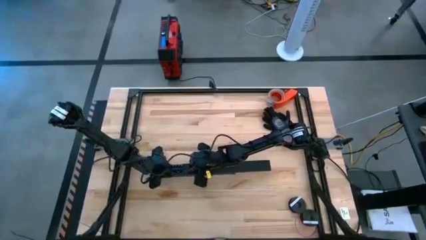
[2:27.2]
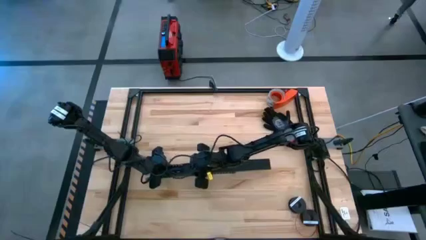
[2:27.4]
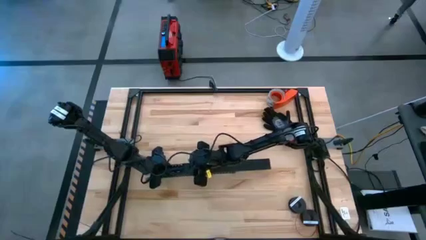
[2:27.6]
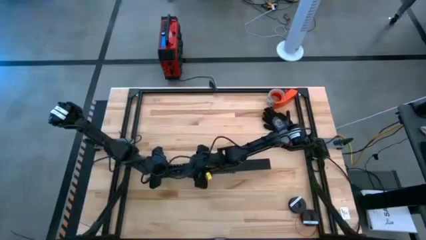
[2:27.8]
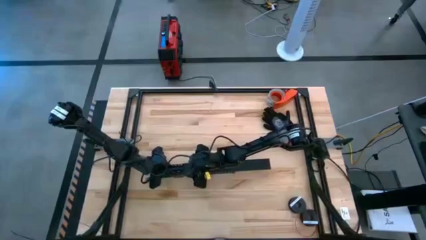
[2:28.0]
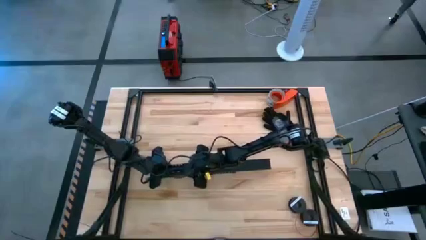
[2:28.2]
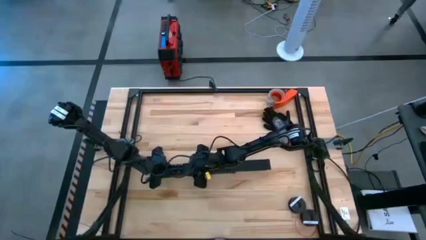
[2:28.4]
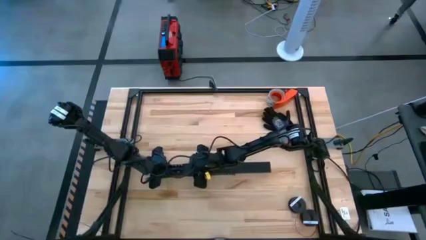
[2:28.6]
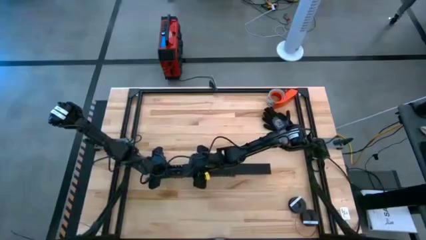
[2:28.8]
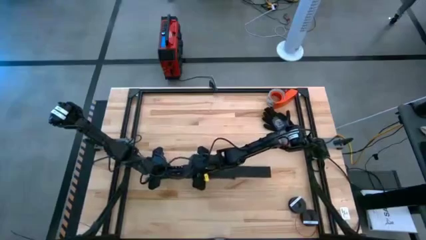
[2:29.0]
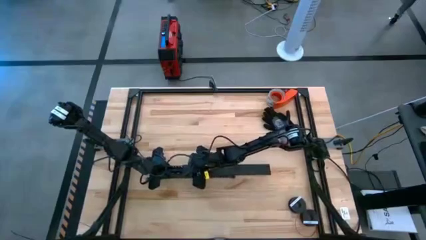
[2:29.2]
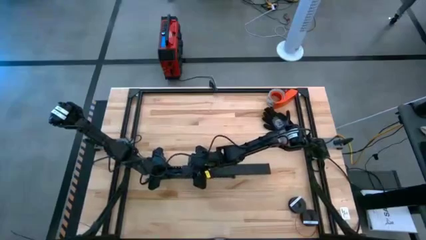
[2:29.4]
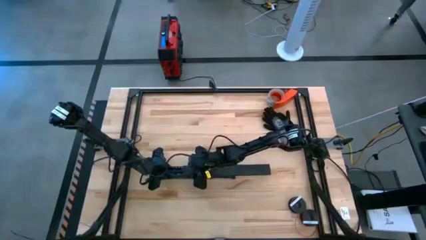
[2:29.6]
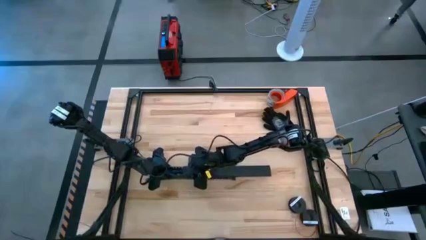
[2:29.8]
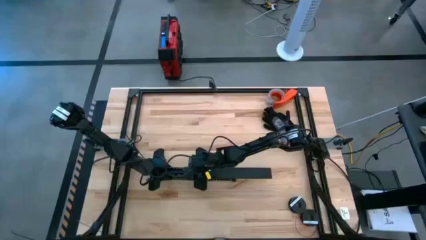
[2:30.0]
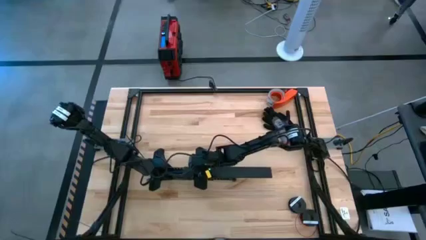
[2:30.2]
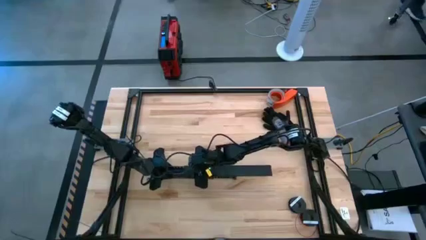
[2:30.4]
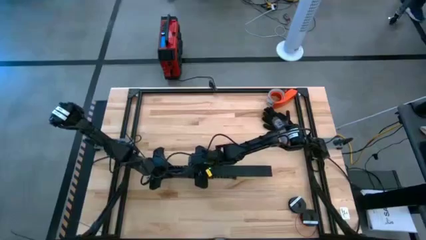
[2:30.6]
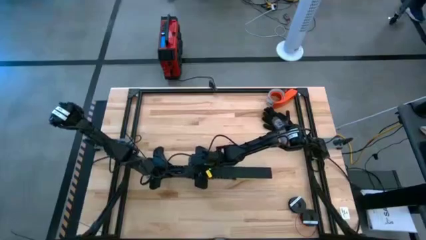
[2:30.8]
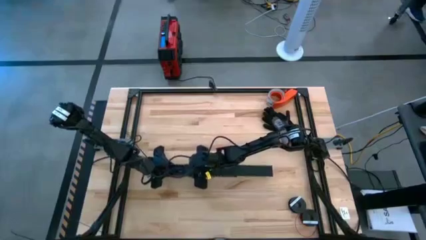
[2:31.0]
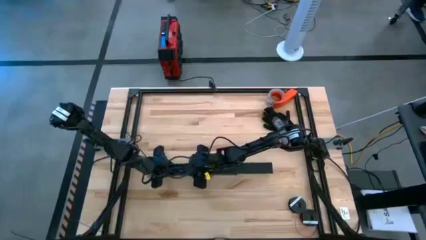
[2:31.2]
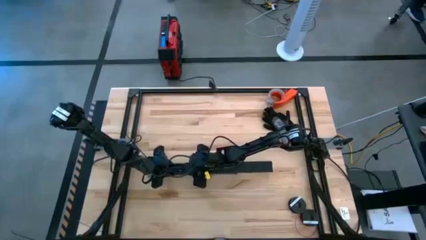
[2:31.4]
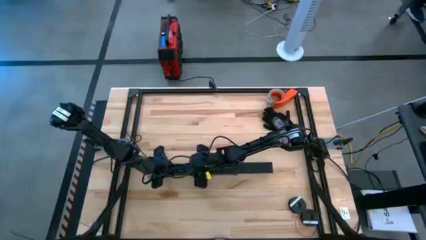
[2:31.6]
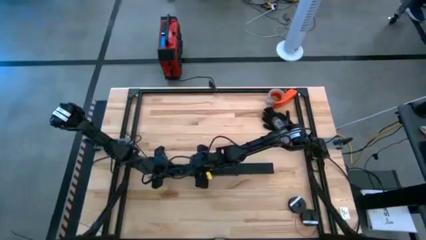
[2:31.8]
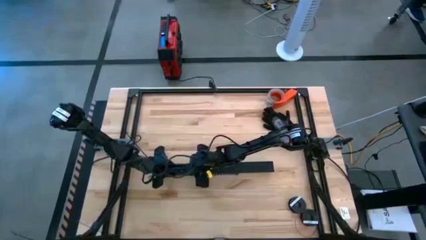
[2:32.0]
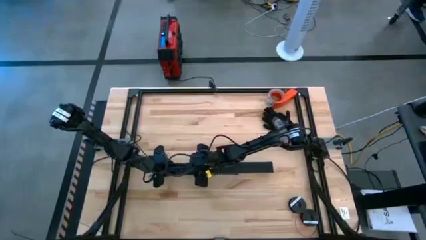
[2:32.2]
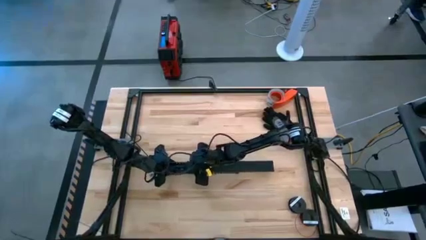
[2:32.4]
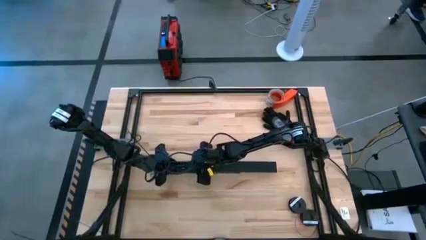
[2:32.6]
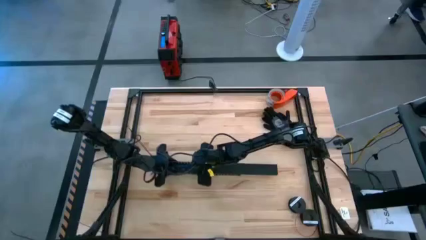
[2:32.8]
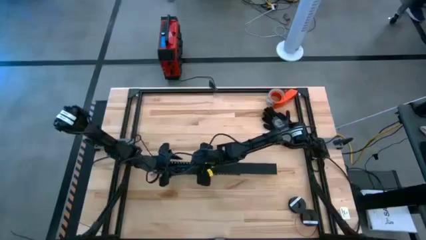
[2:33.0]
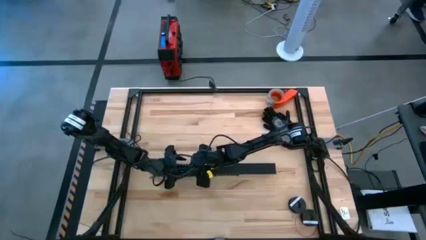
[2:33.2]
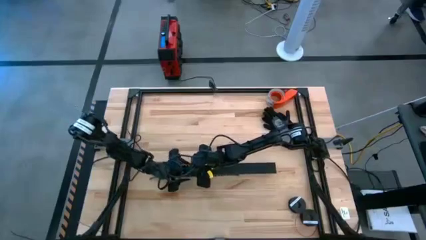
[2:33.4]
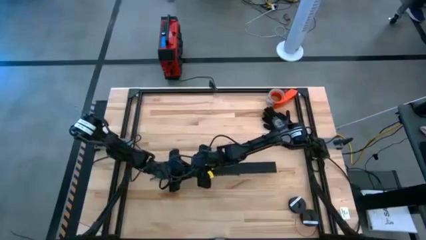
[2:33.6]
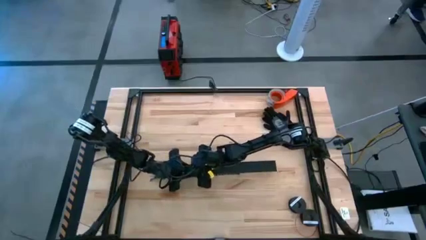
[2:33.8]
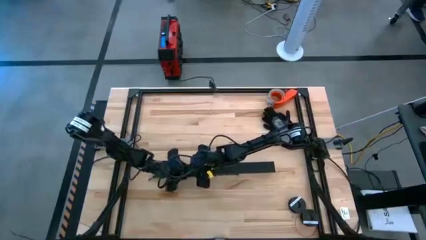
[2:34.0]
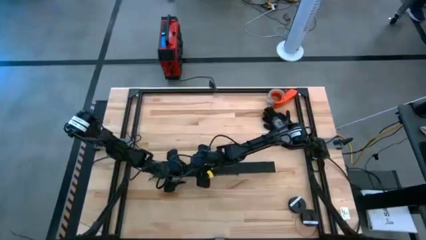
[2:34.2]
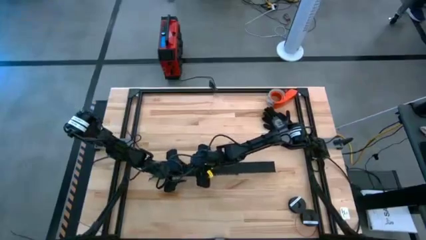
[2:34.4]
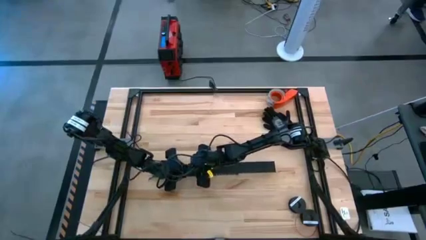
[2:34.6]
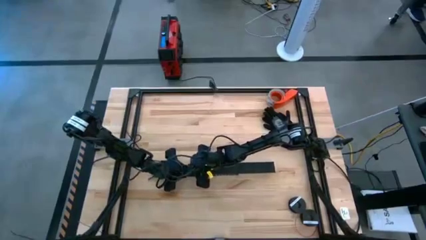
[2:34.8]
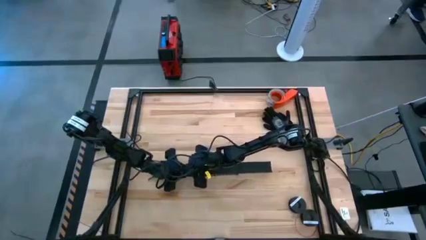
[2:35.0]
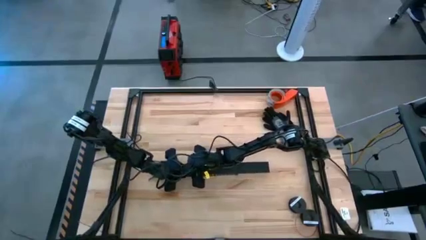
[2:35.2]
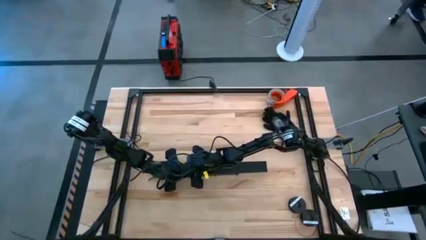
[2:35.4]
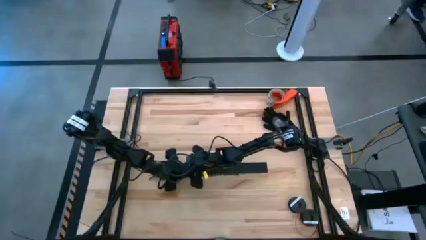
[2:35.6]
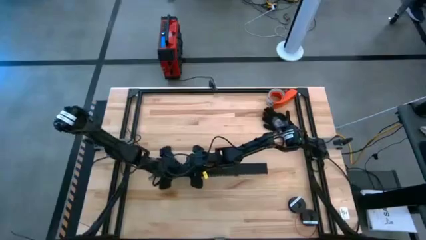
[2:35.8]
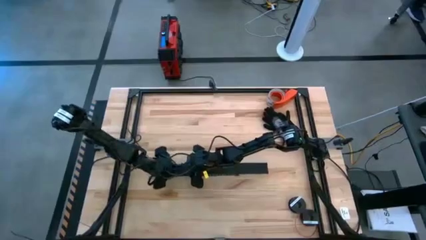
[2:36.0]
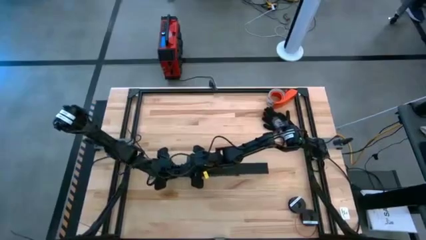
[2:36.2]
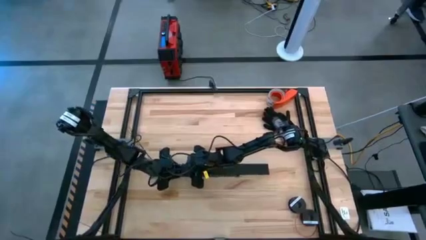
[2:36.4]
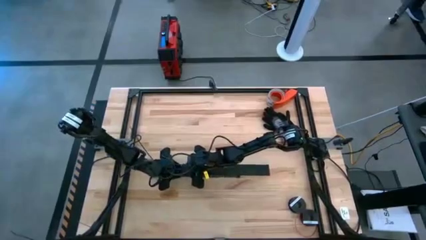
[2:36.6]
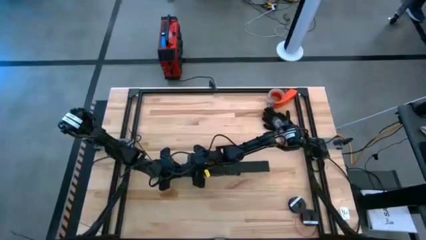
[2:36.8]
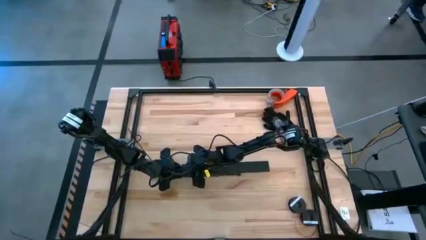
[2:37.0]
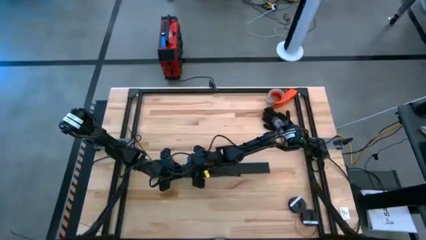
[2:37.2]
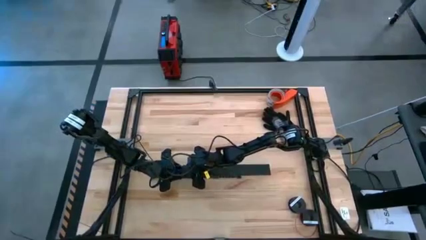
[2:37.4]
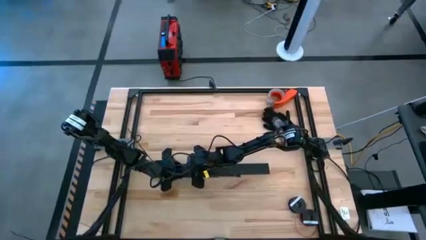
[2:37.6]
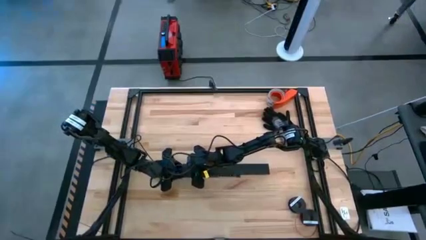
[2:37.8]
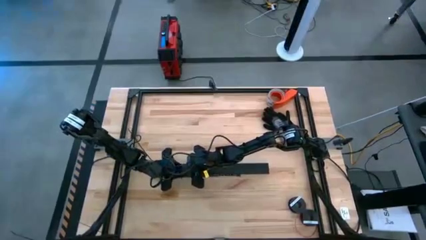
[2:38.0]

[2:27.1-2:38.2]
Task: Ziptie cables
Close the black cable duct

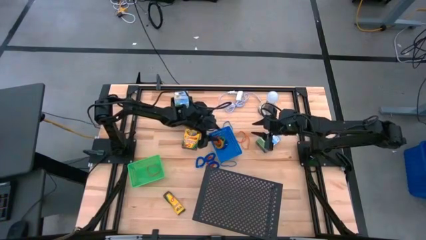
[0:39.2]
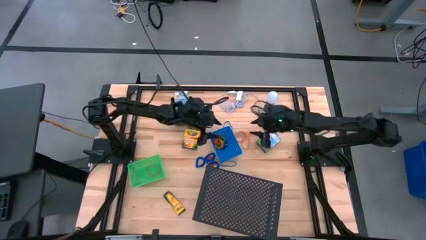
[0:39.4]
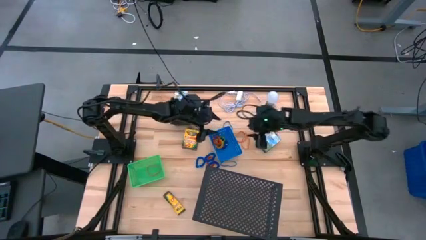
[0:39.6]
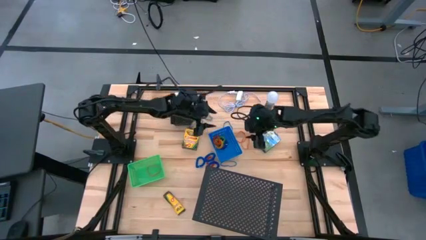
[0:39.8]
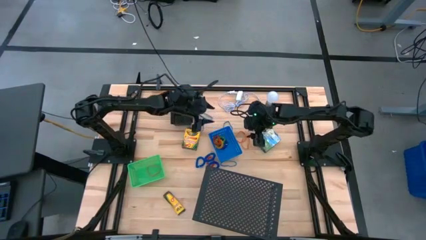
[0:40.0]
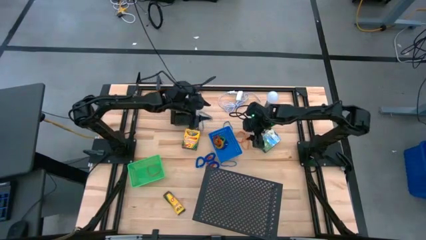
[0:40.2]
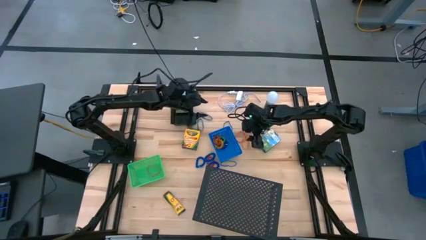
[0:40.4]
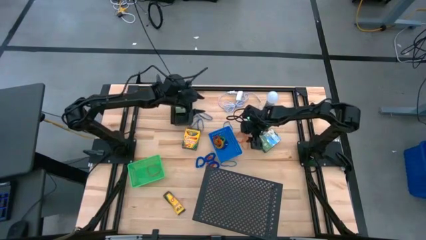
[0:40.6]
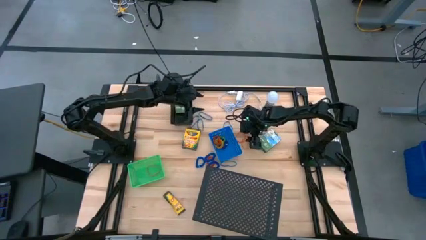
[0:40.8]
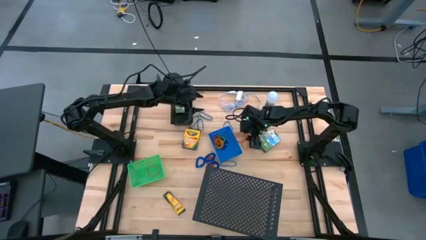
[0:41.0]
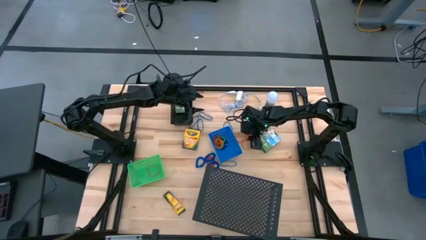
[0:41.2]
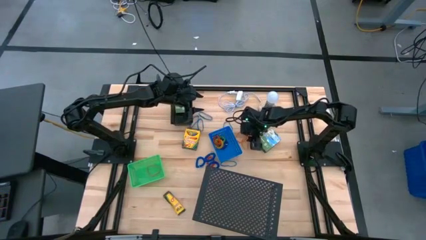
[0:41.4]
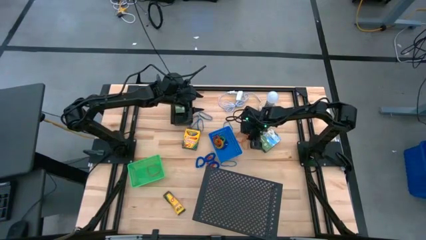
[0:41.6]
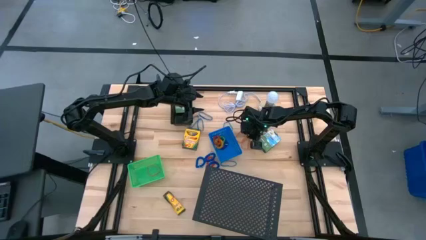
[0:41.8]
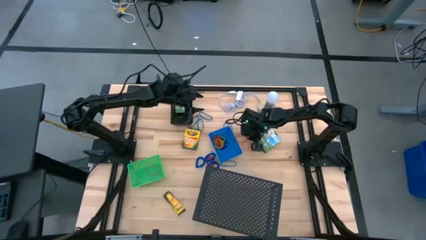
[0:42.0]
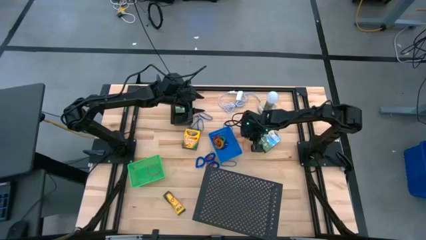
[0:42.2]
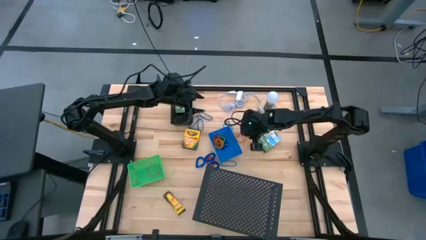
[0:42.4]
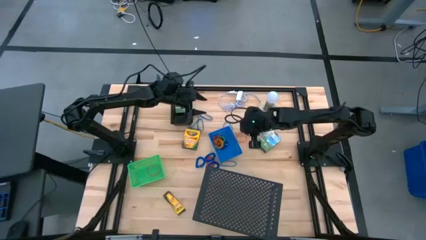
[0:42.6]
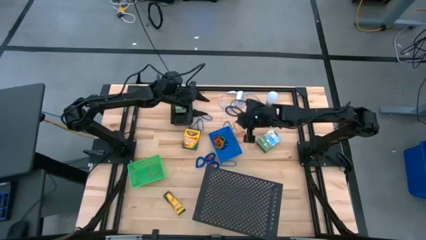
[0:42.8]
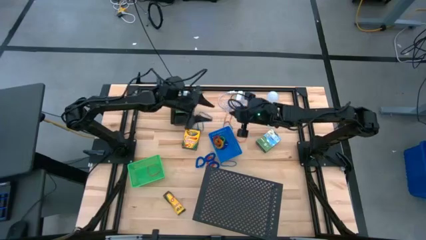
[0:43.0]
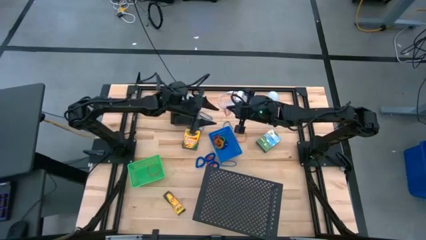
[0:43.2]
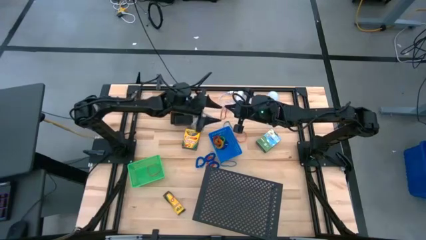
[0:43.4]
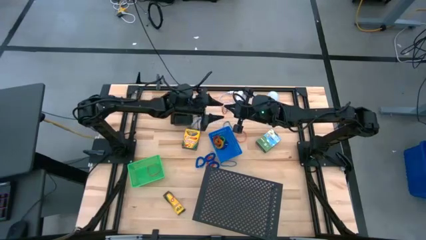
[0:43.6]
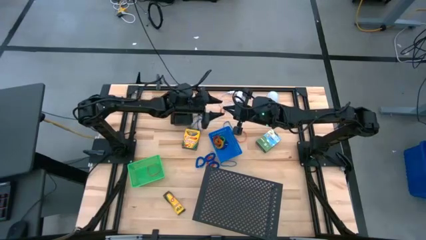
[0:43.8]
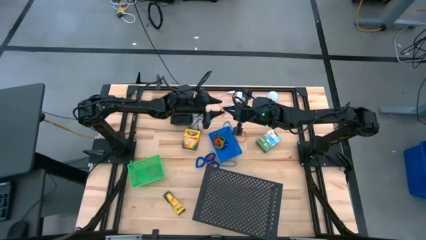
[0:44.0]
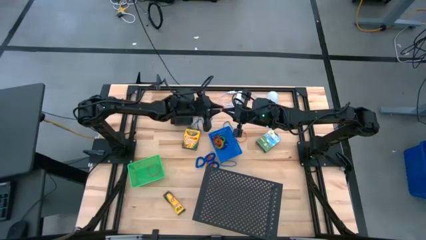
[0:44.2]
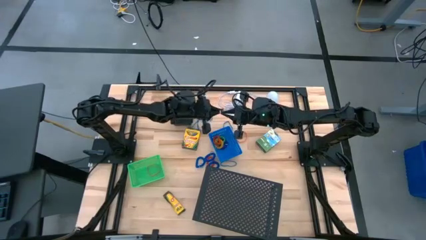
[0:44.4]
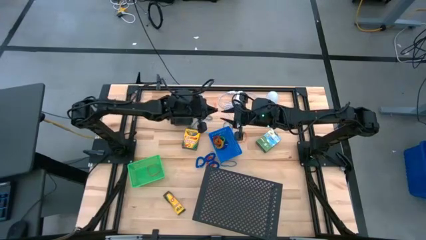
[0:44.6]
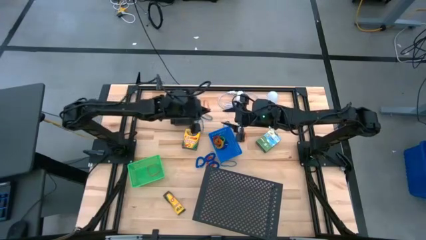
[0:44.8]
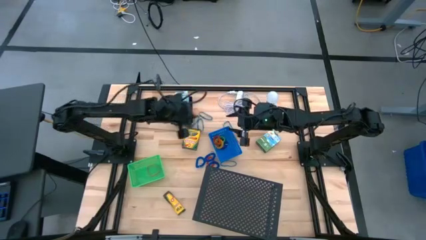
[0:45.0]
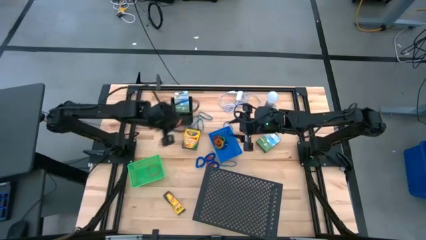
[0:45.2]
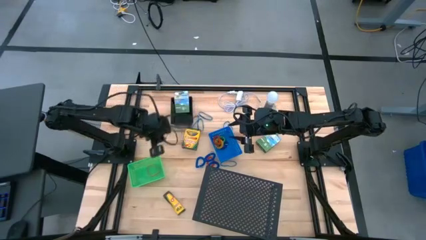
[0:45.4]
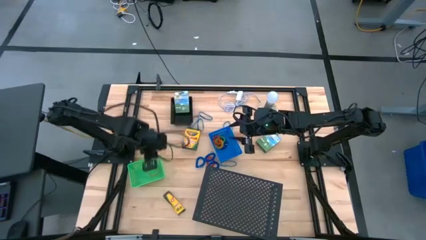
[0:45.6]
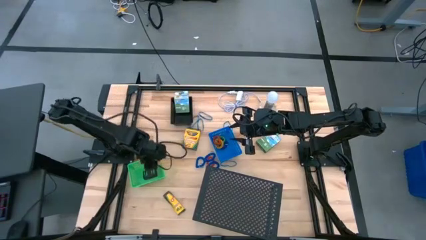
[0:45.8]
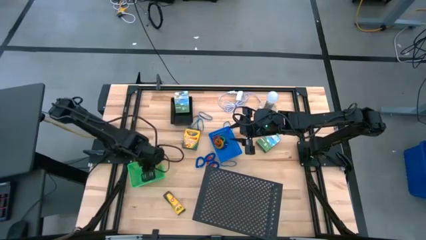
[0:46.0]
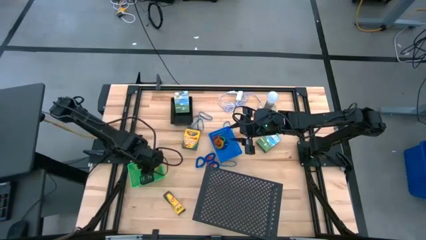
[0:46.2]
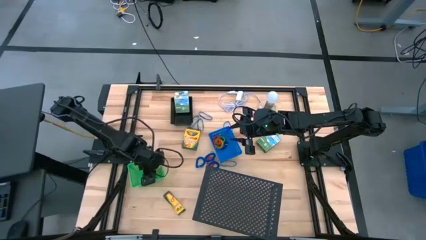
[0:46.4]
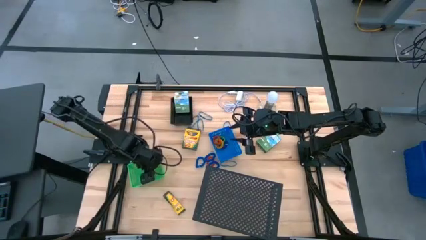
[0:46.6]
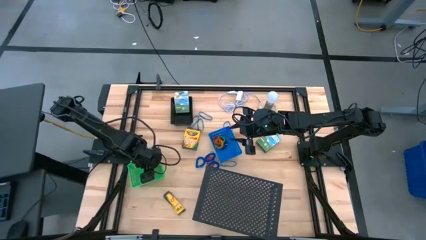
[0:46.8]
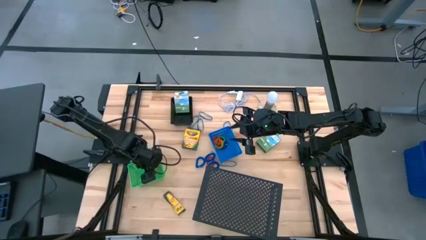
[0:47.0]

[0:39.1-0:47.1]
Task: Pick & Place Office Desk Supplies
Put the bottom yellow rubber band into the green bin
